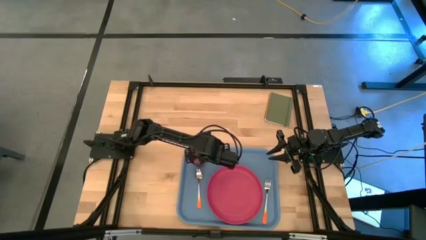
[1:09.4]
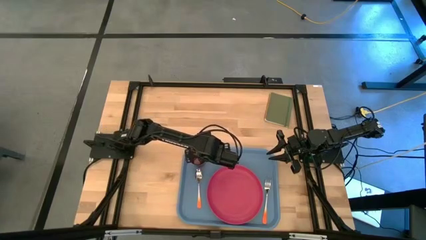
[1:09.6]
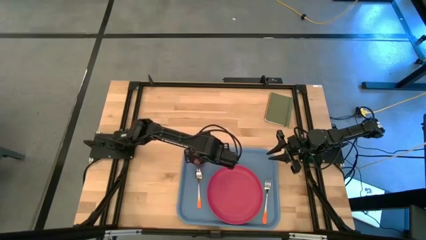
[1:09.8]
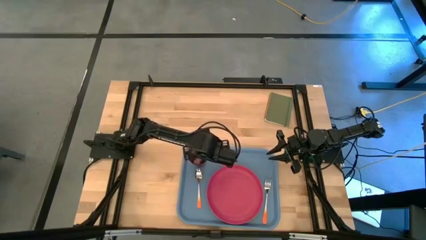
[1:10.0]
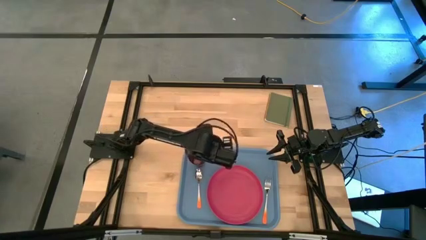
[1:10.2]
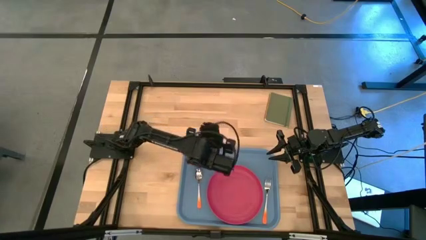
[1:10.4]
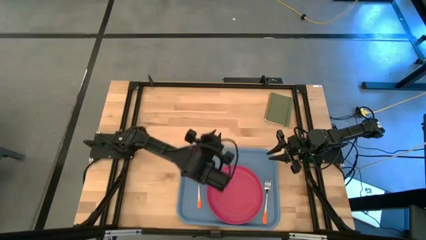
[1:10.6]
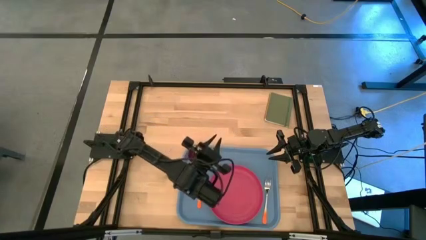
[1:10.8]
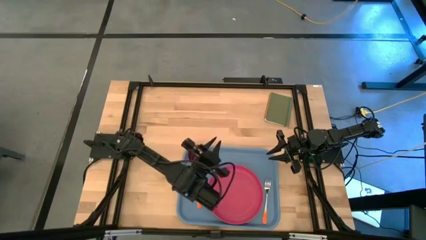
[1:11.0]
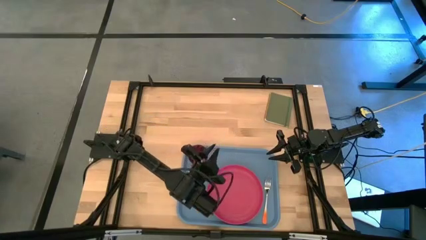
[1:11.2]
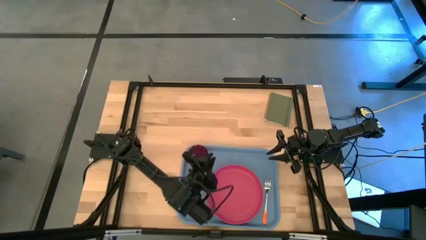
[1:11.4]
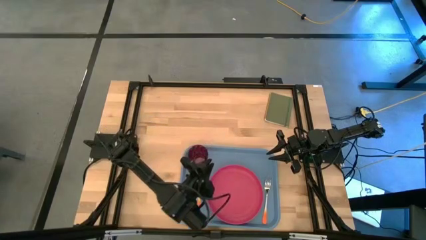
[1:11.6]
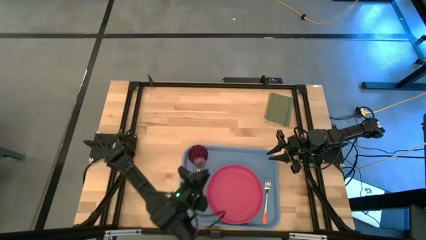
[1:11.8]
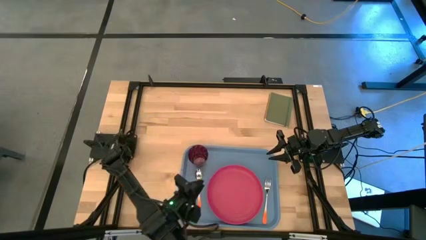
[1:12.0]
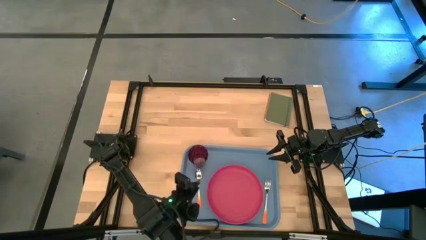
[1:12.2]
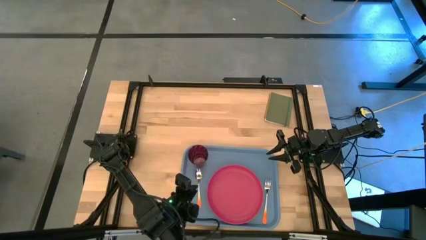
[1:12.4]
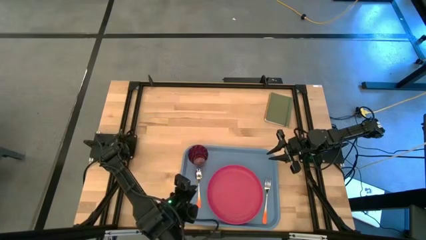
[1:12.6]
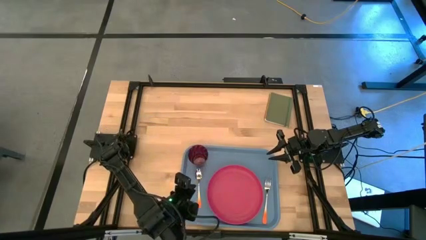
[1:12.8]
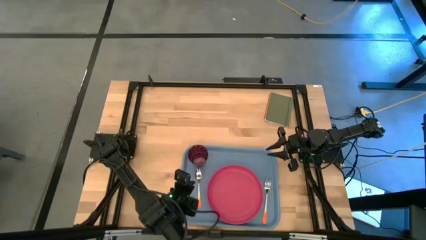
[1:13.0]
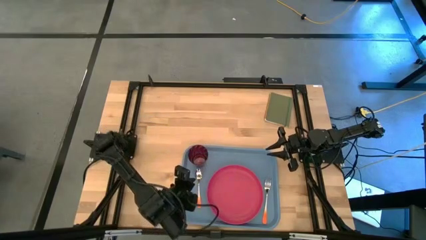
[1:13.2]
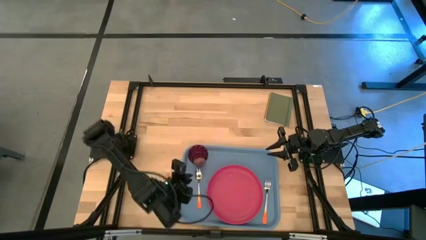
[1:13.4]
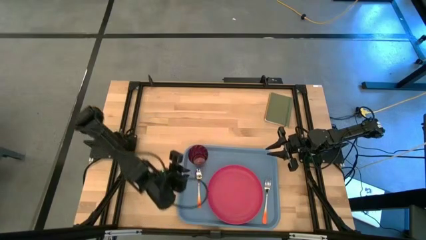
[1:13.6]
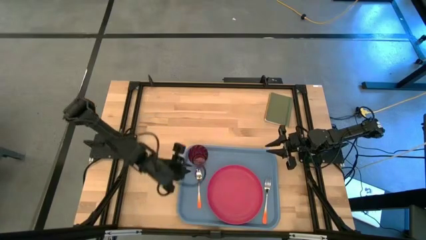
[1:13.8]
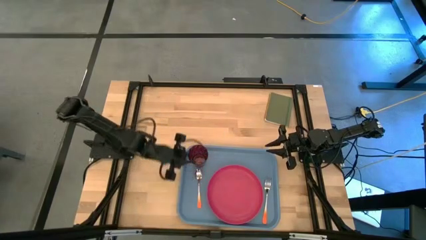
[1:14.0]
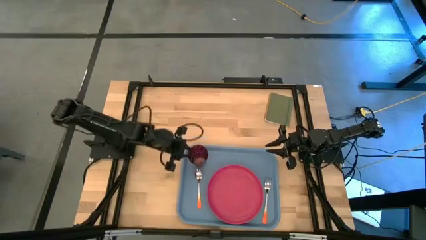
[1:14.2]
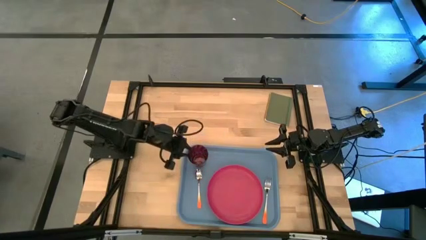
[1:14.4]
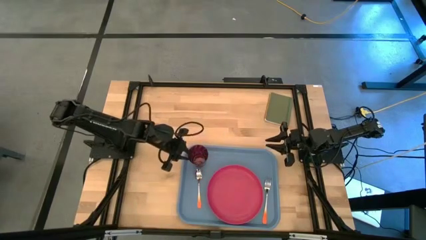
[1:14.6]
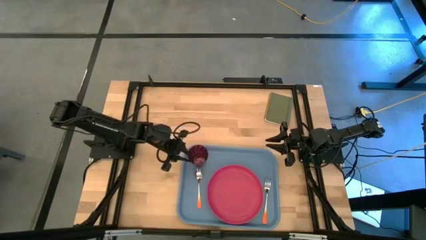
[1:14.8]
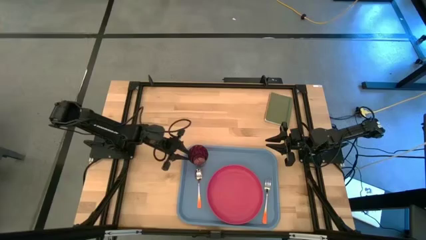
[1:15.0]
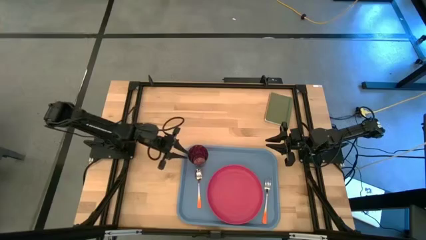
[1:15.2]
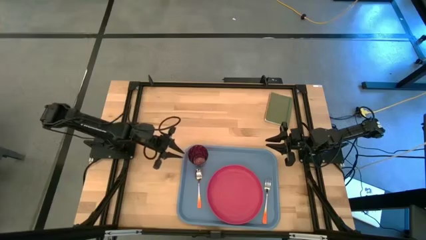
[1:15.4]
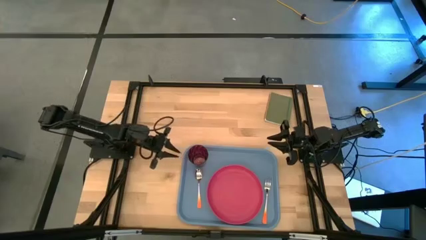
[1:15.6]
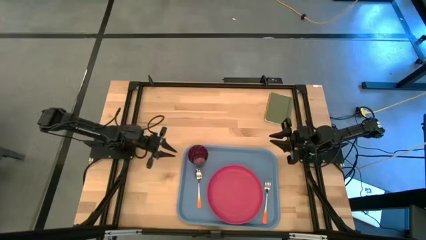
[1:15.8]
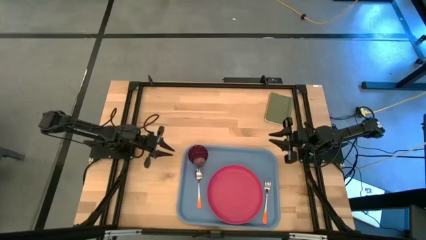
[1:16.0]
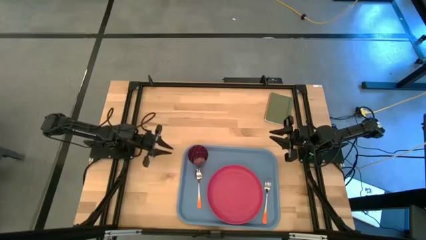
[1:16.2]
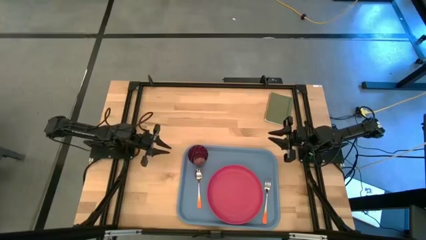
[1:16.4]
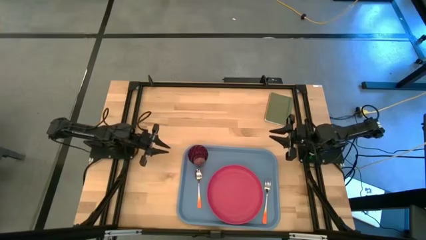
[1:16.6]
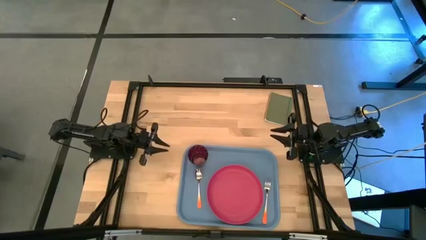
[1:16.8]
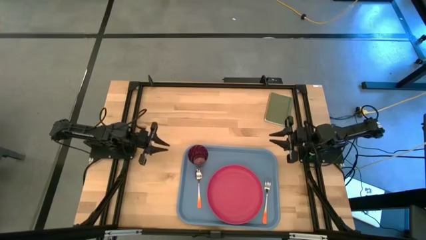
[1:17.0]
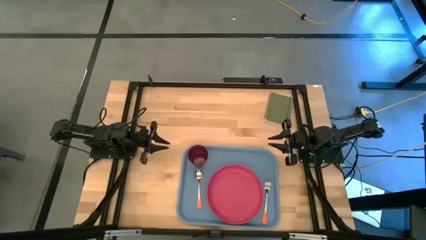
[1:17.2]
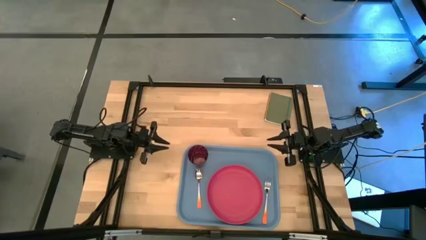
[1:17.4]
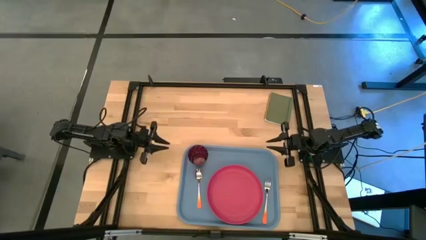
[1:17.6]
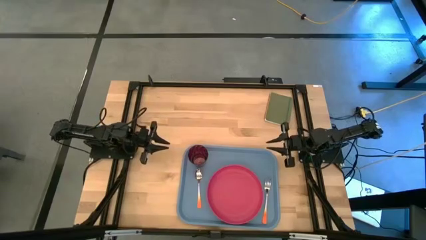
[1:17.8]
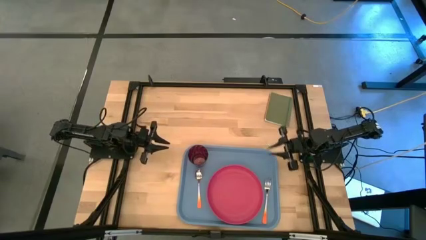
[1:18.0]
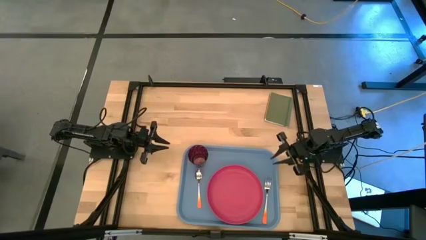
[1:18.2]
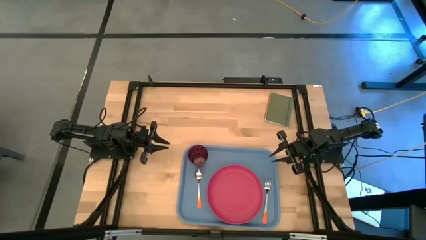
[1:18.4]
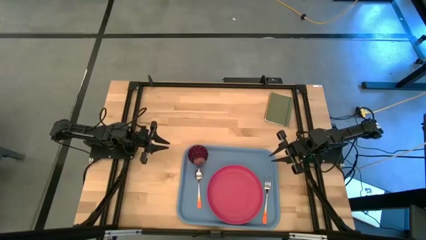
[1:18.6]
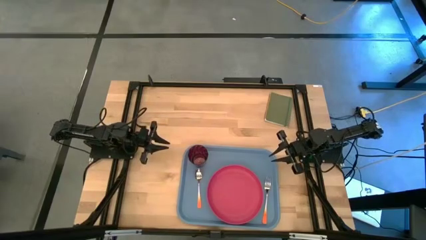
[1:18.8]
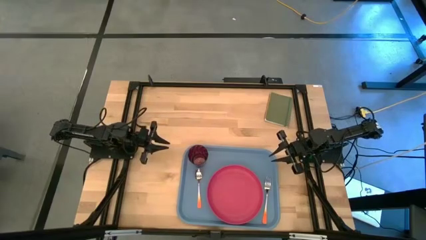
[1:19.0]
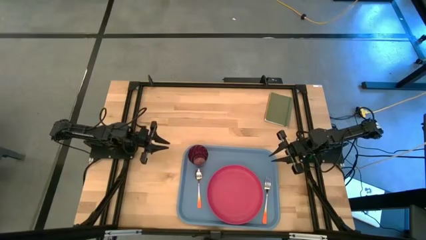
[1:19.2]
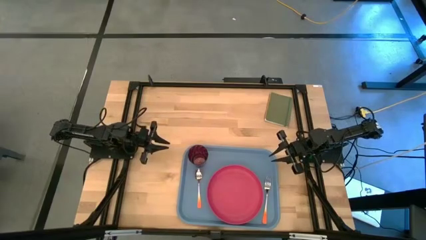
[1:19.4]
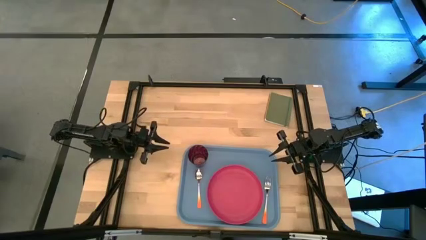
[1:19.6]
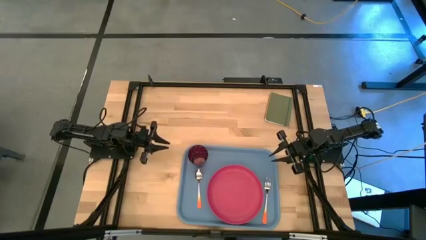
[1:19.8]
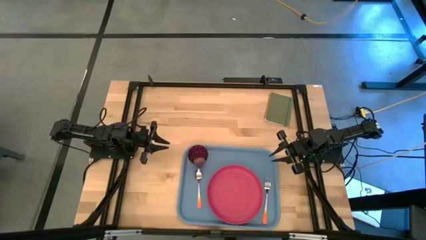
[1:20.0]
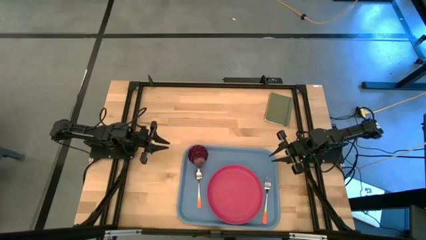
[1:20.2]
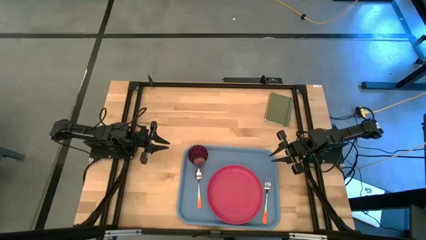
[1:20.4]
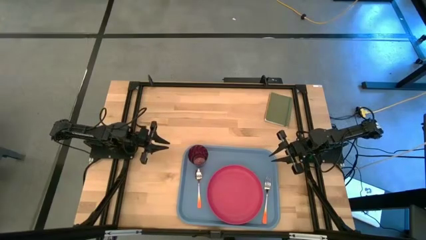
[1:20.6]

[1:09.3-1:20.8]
Task: Pick and place plate/cup/fork/spoon on tray
Return to Home Position

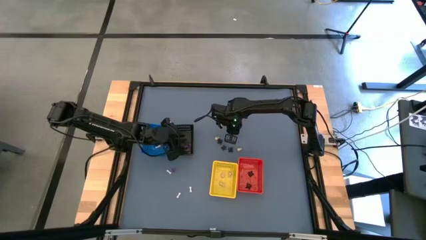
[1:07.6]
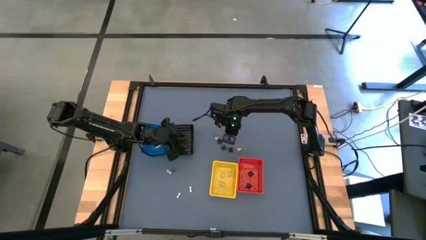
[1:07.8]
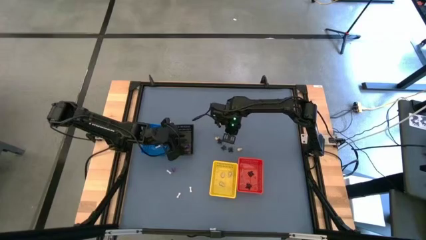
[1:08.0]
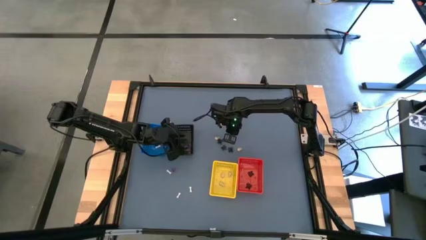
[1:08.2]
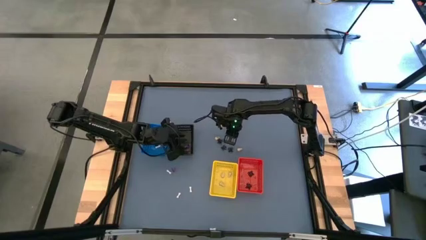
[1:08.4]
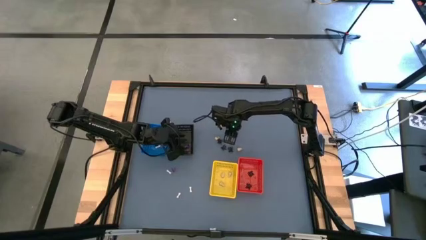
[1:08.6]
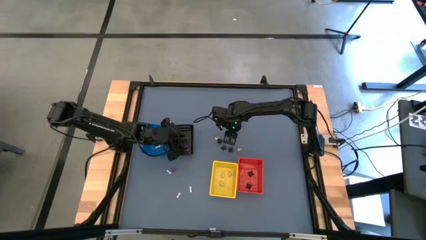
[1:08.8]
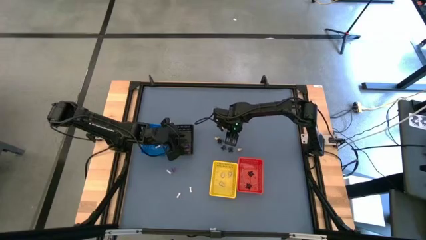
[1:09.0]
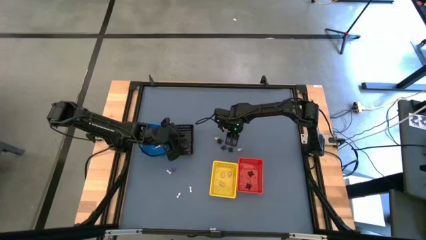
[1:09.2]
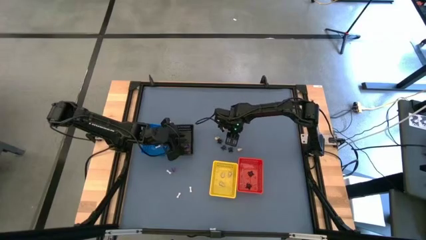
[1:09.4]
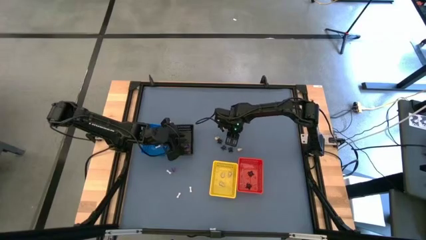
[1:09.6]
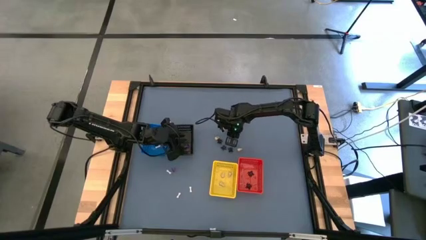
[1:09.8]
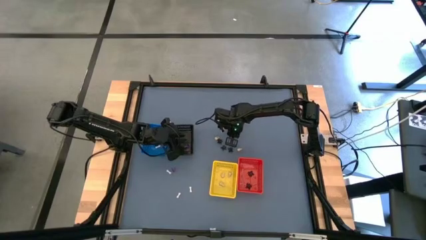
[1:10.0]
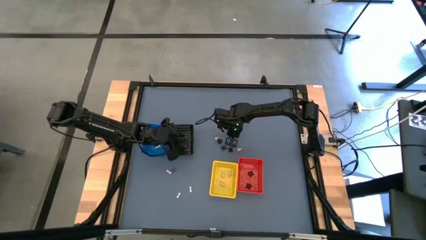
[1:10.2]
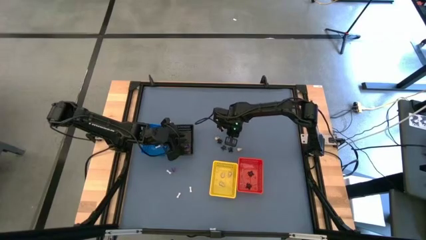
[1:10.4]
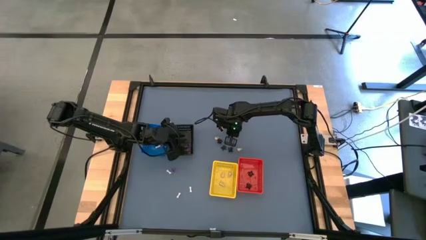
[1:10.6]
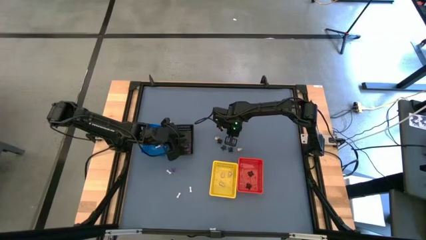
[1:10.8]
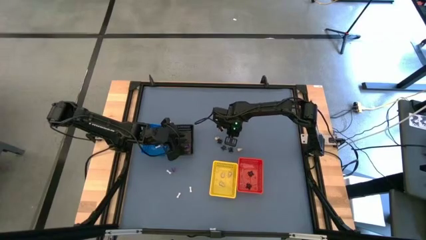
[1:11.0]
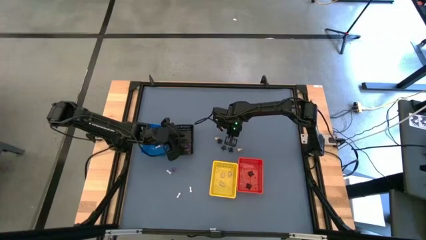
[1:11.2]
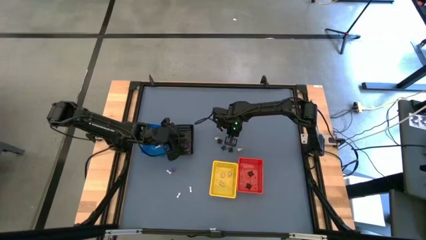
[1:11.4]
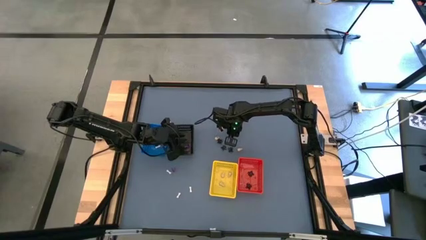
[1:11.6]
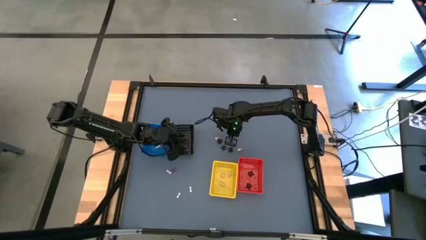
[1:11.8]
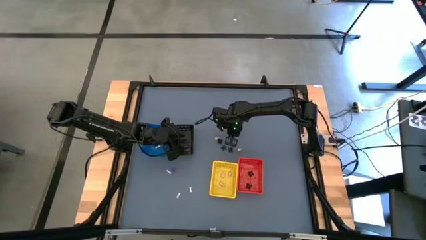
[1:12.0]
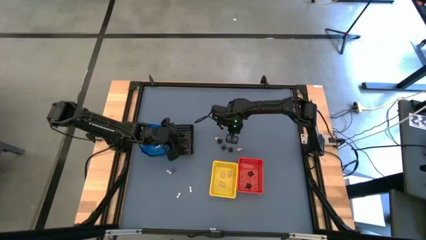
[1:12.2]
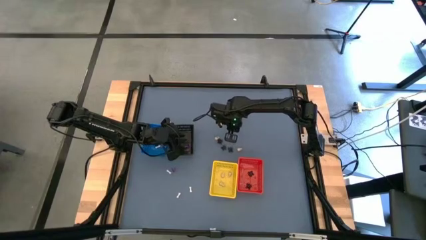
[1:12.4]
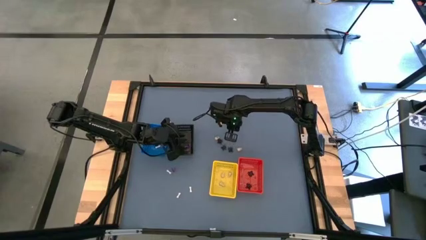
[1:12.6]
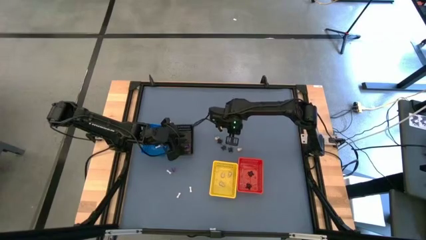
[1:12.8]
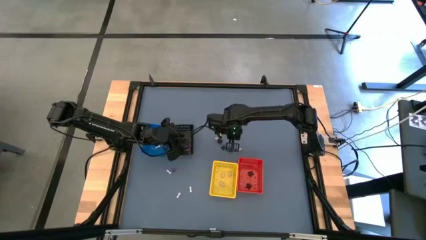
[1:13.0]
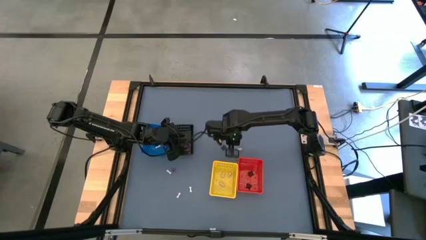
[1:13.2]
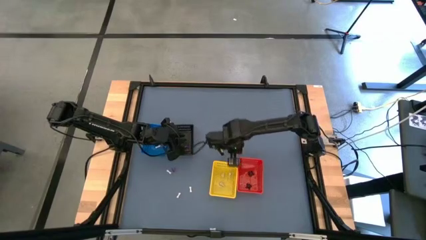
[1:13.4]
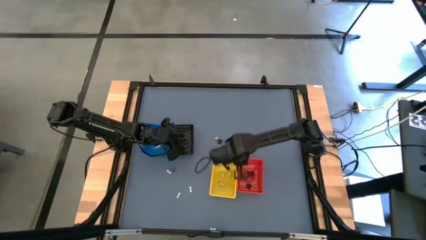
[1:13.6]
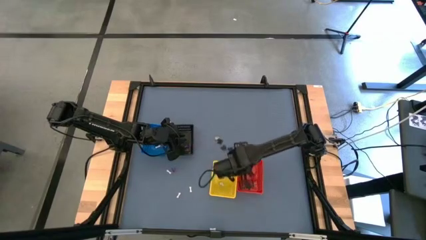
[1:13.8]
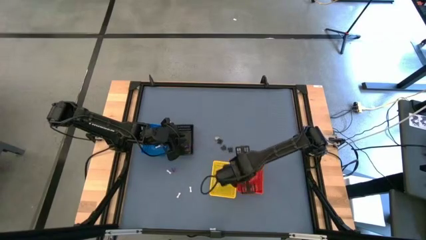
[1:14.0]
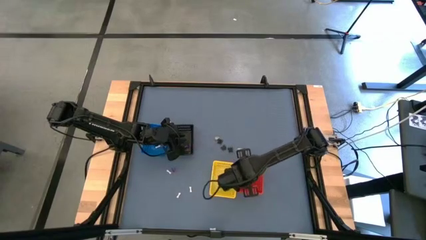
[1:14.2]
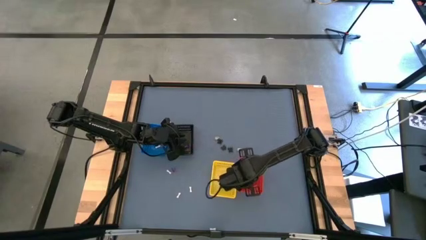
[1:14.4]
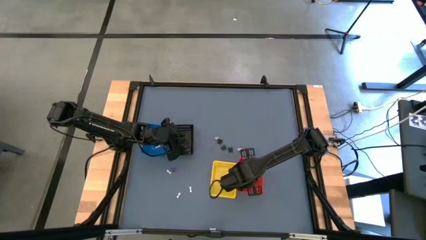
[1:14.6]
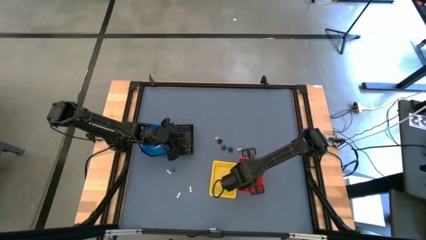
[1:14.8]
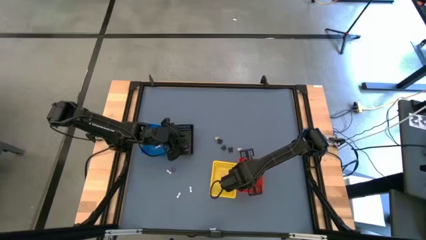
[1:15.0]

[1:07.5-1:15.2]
Task: Sort Halloween decoration
Put the spider toy into the red bin
